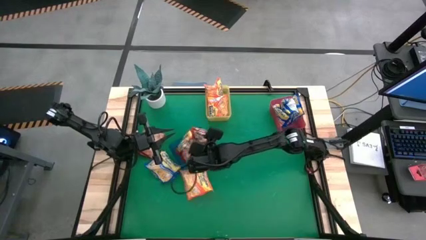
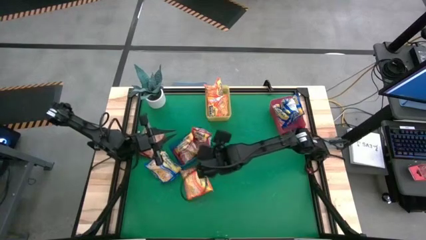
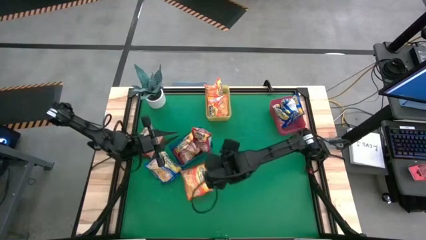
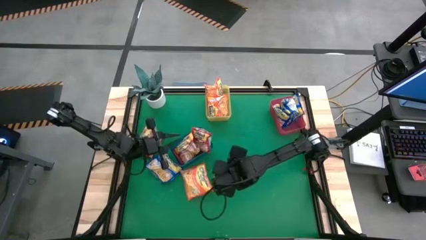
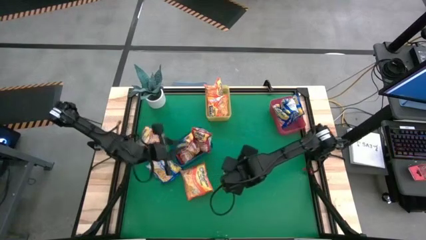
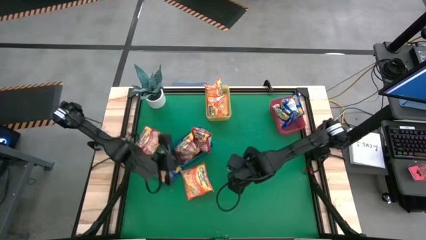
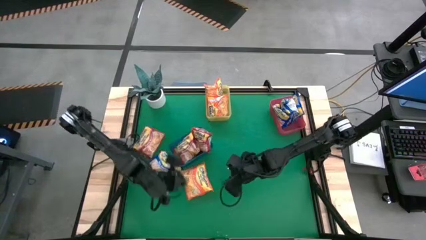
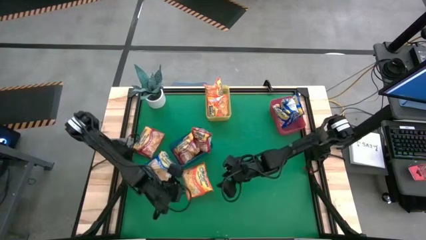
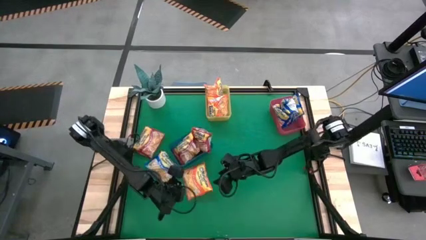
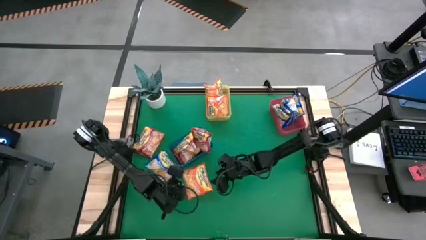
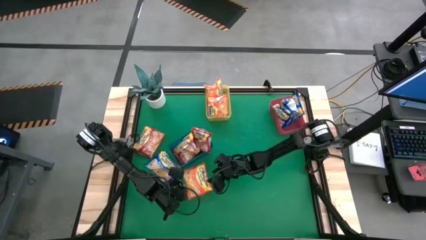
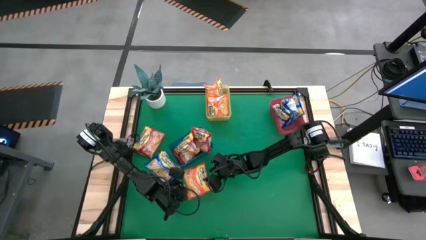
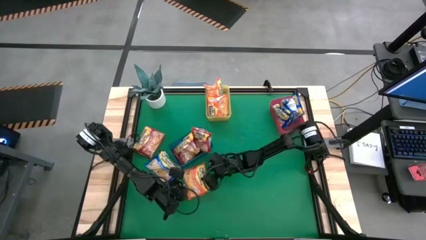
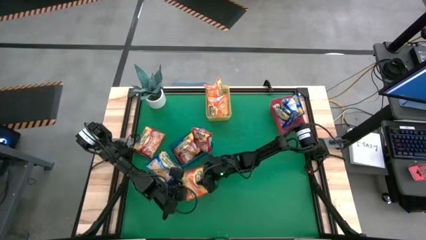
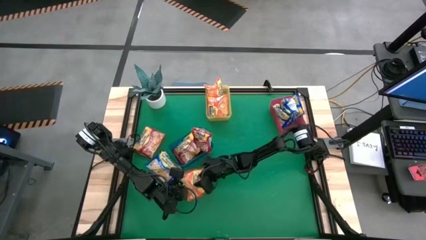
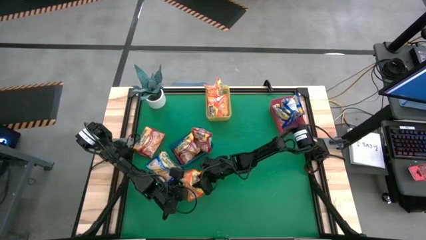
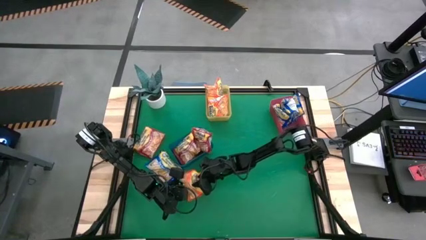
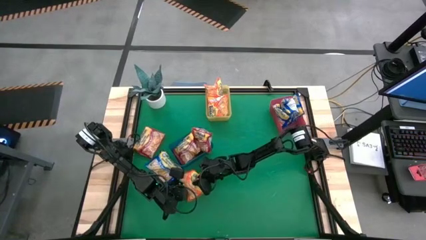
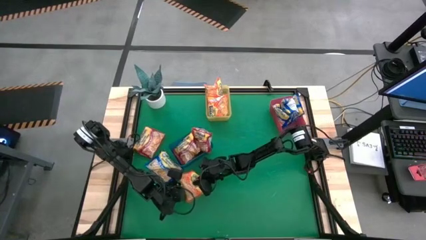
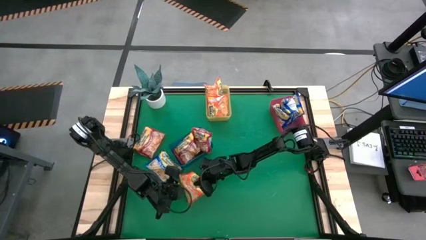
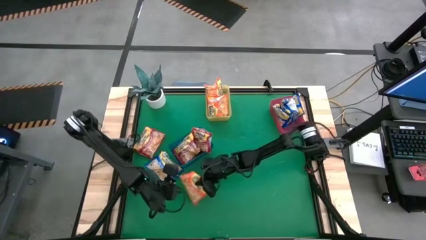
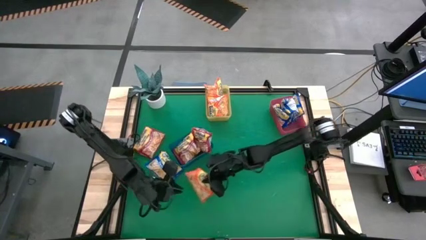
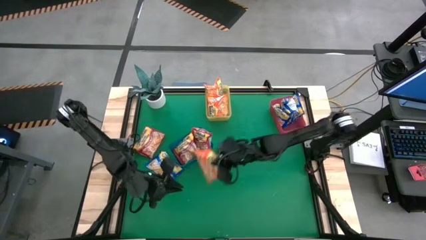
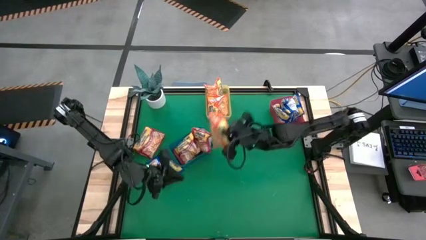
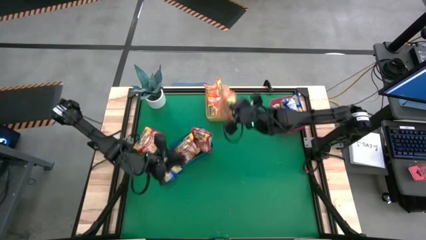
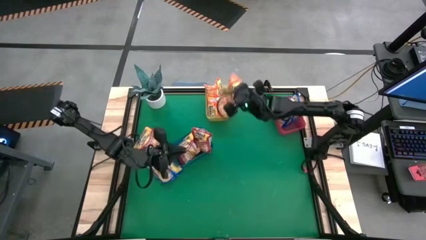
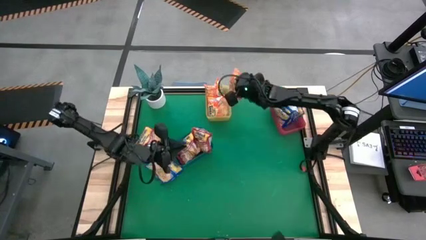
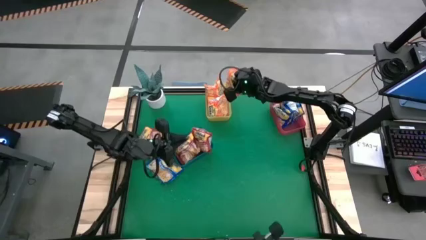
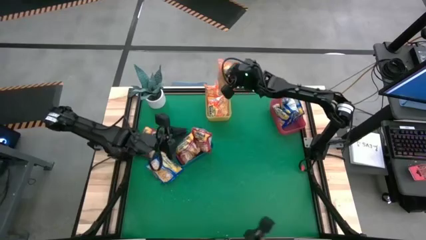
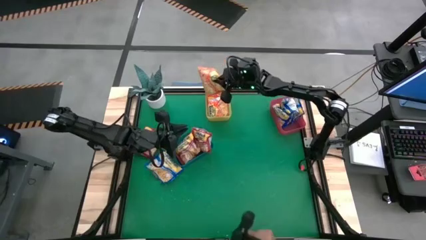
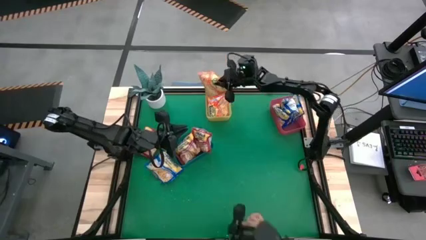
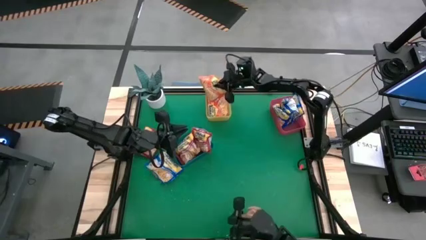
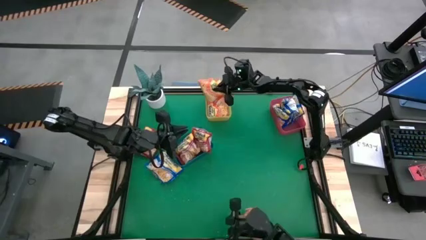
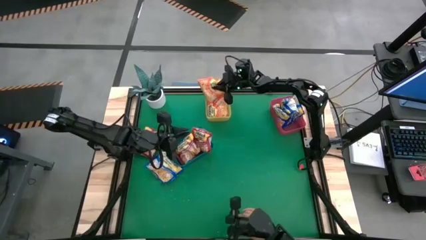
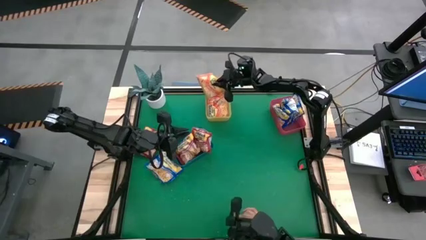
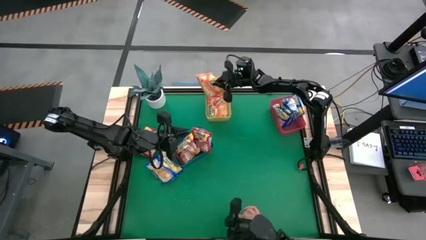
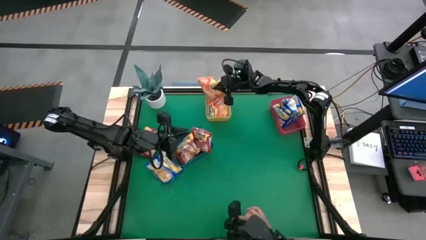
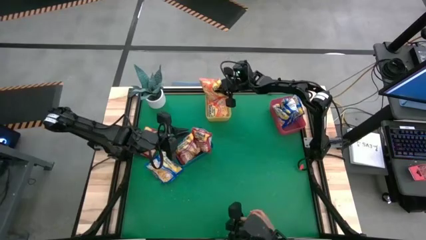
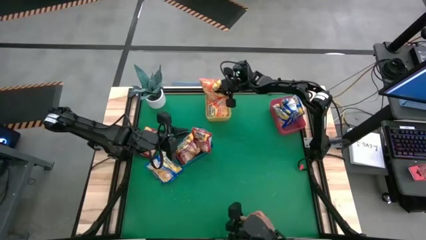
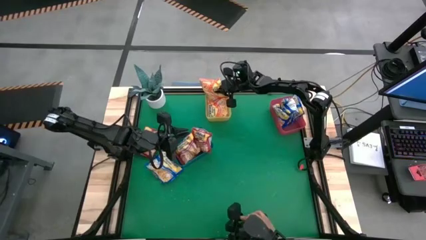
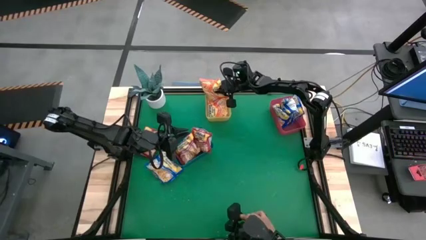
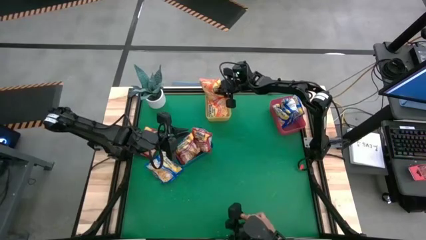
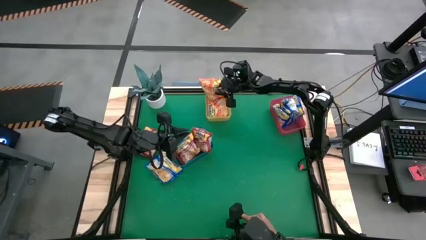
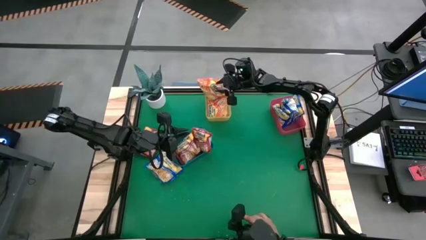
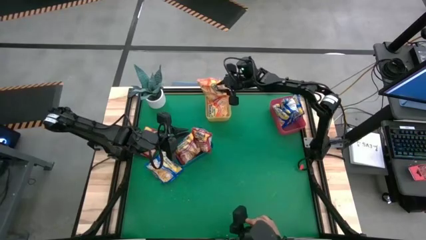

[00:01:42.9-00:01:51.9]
Task: Sort Maruchan noodles
Put the orange noodle into the yellow bin

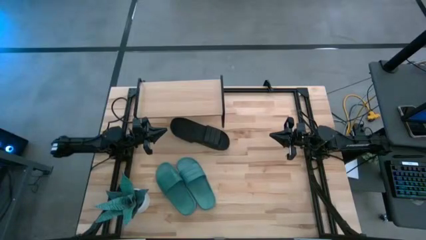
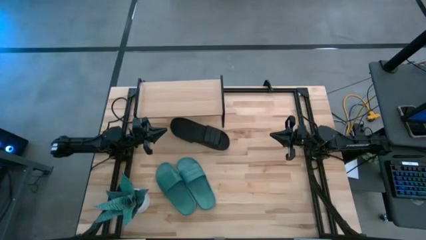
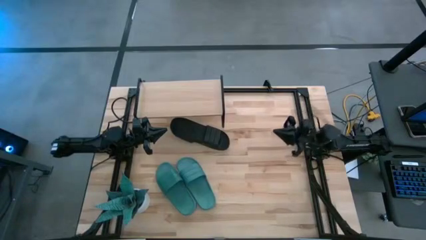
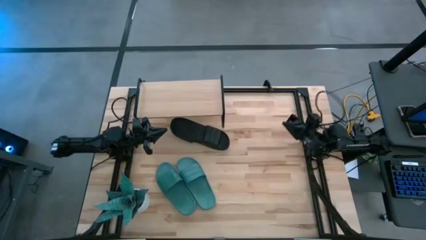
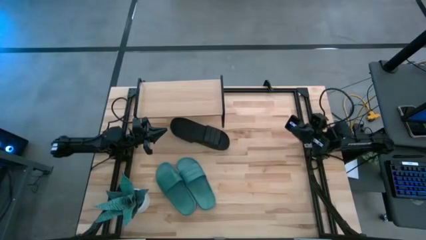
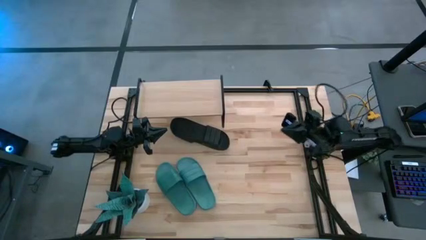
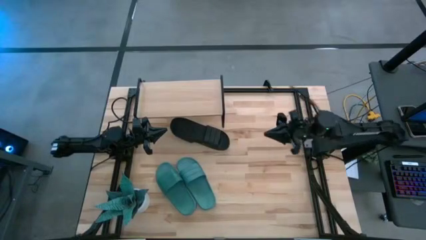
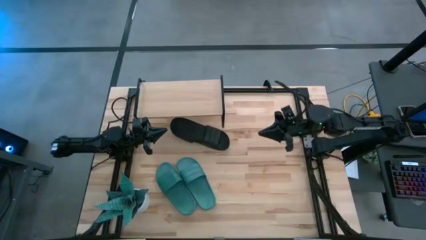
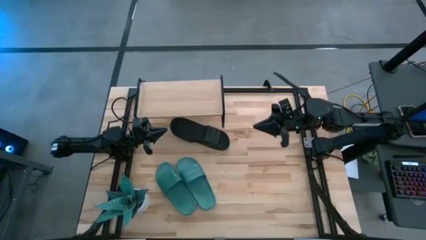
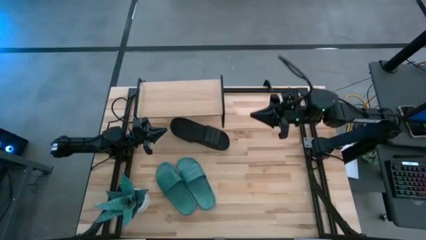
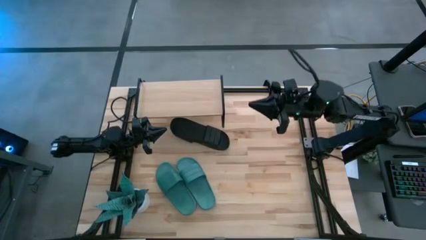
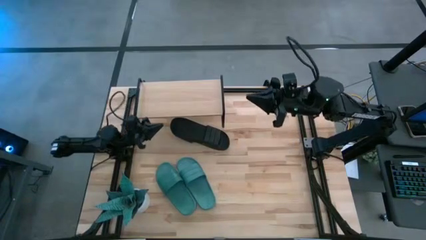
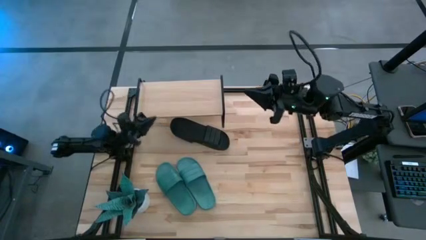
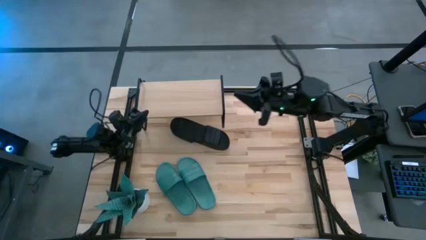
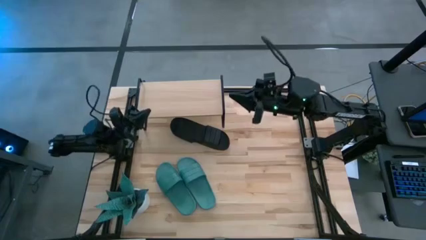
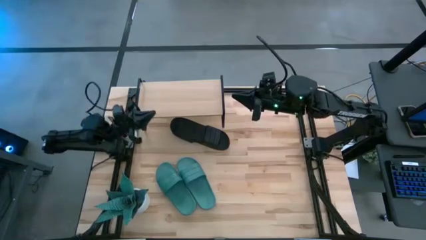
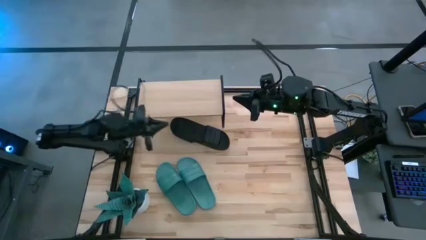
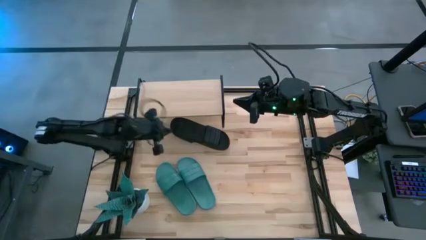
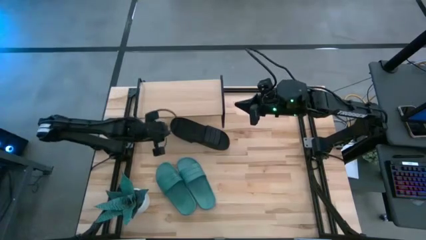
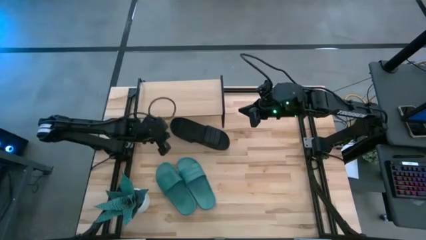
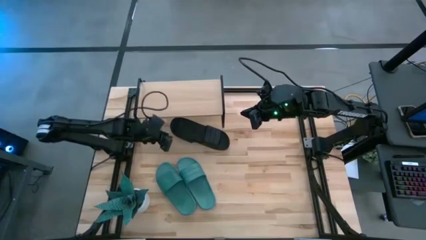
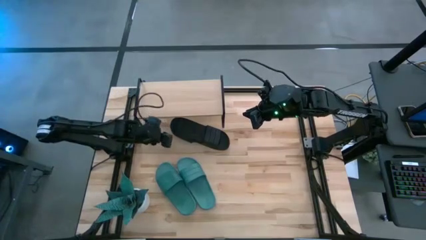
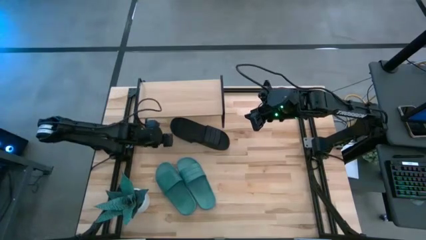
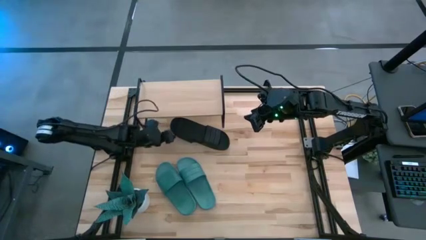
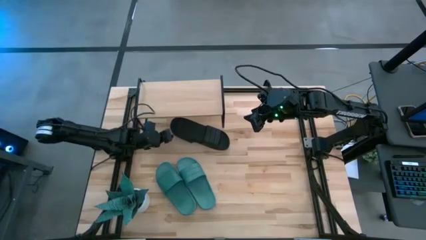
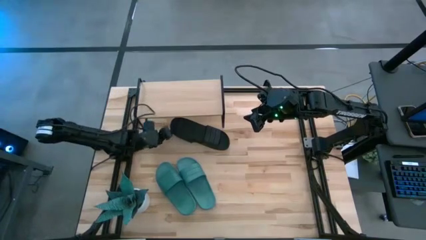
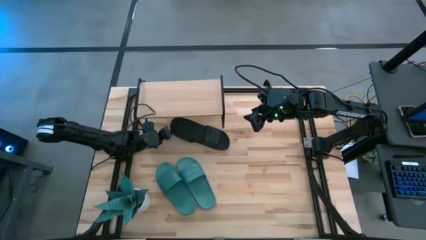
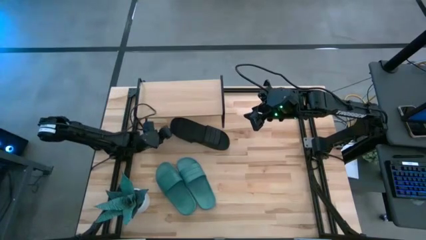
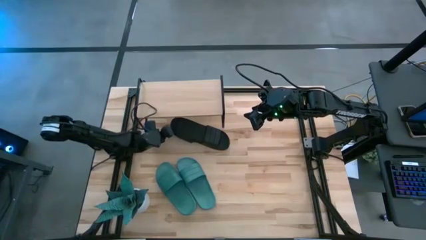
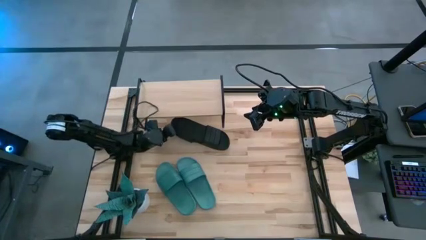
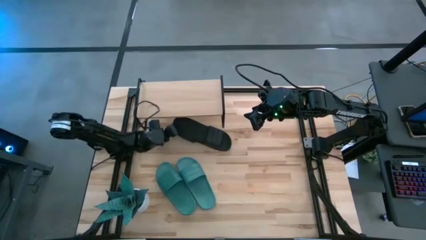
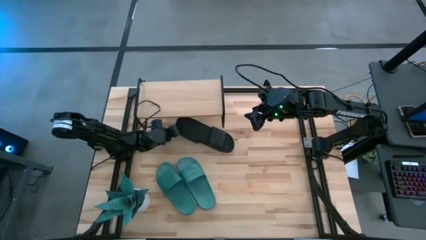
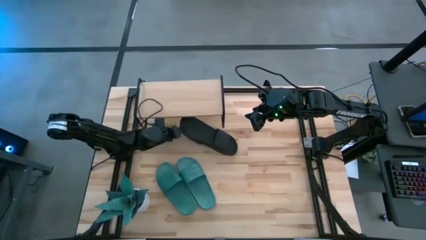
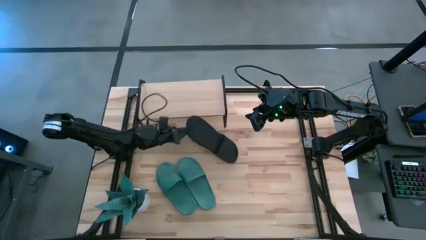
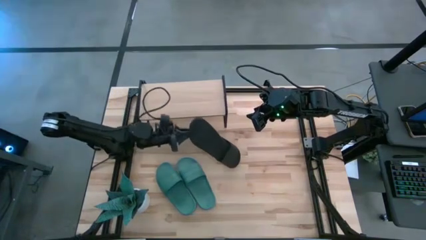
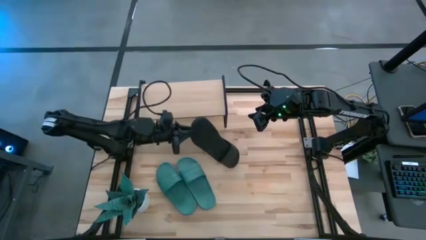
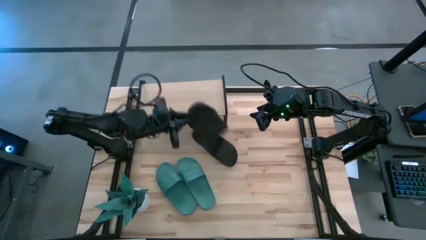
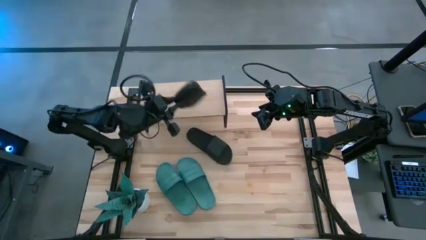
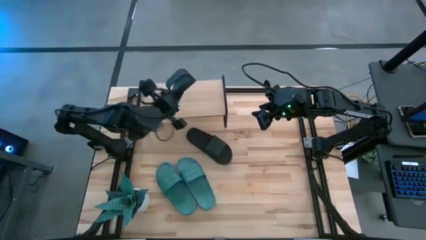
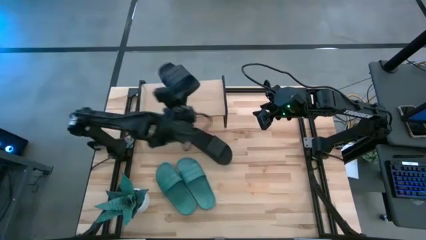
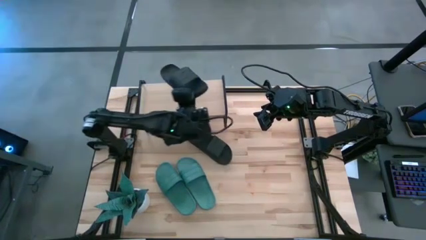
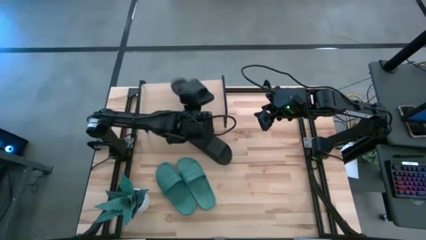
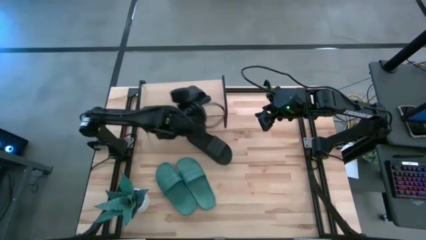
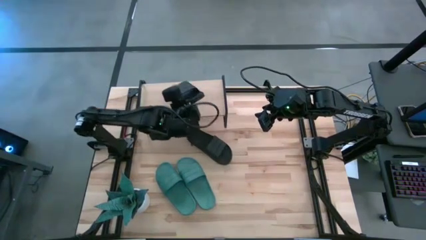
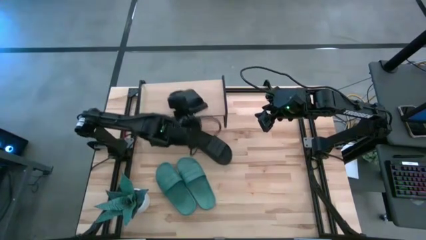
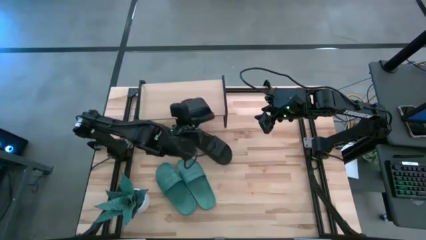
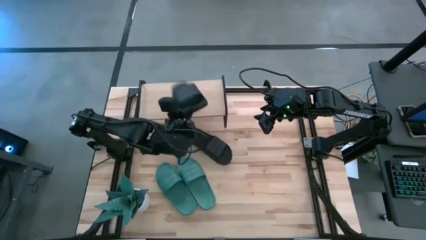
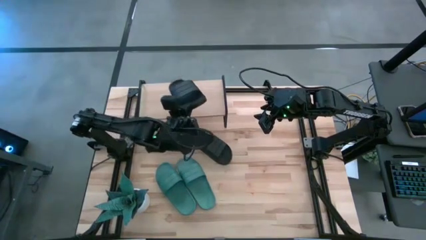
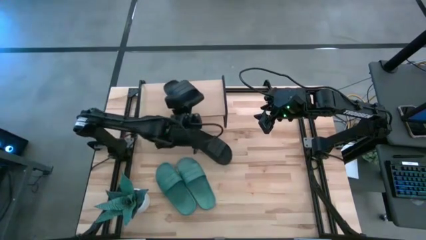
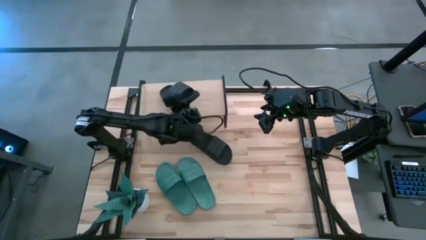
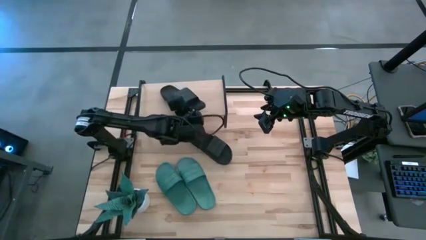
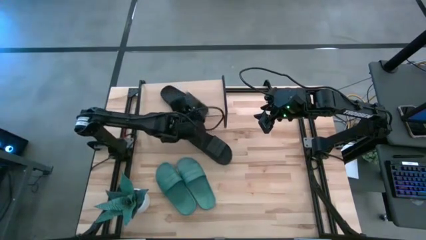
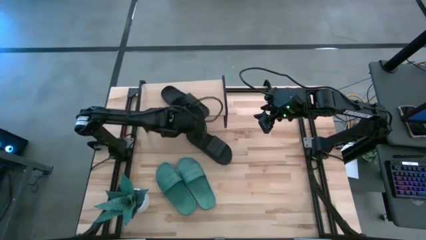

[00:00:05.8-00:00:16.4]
Task: Pick and place slides into the shelf
Put the black slide on the shelf
